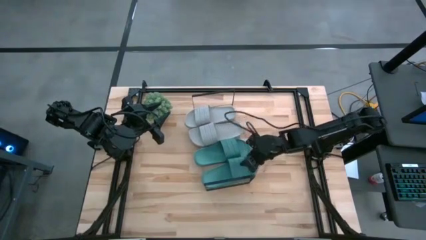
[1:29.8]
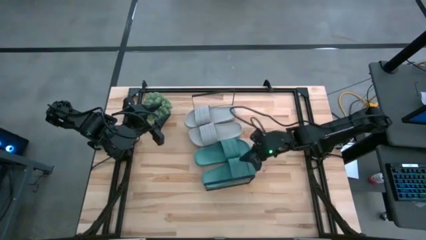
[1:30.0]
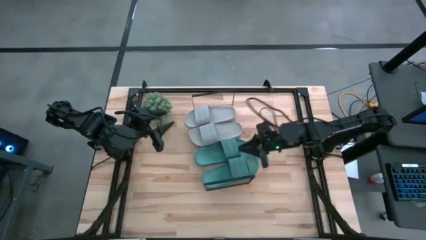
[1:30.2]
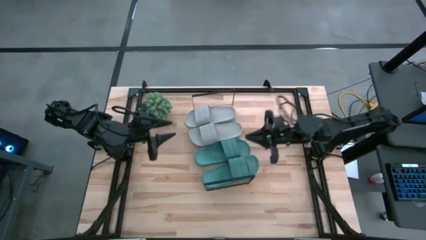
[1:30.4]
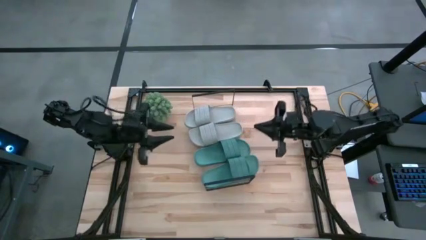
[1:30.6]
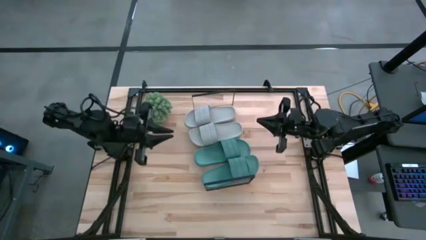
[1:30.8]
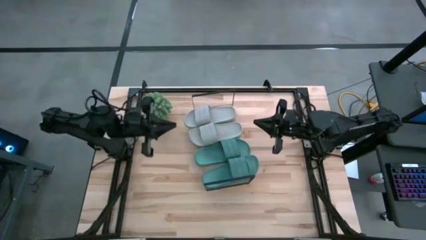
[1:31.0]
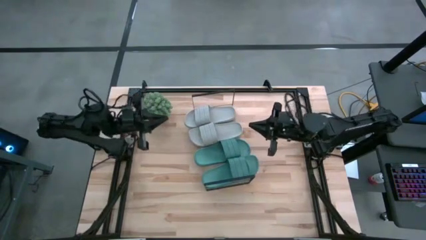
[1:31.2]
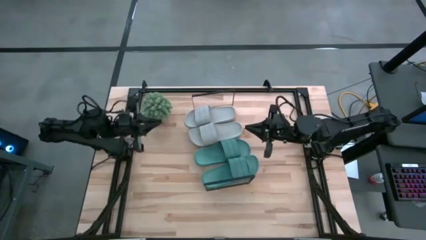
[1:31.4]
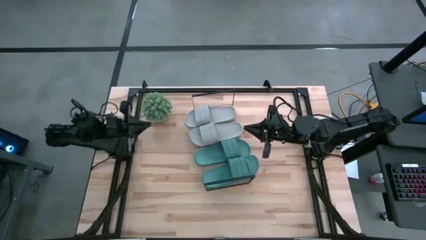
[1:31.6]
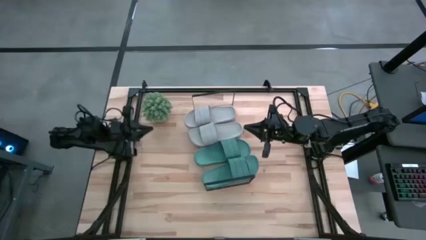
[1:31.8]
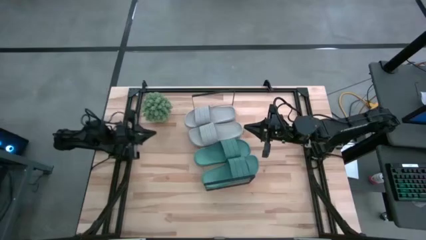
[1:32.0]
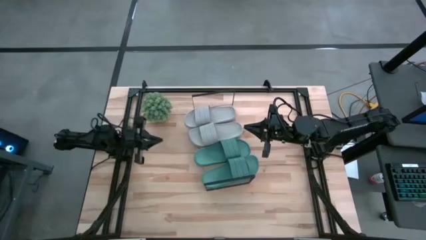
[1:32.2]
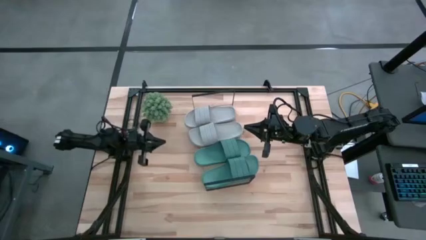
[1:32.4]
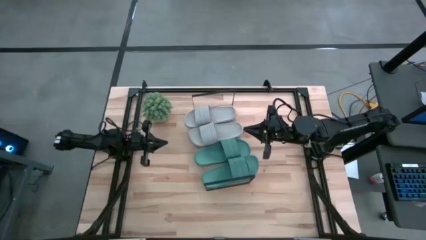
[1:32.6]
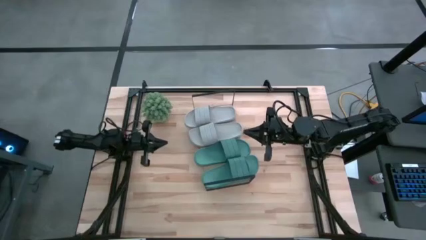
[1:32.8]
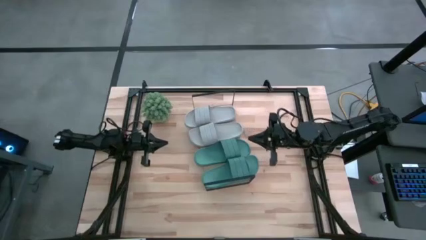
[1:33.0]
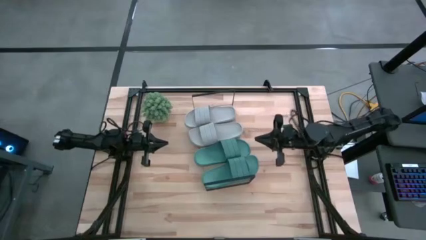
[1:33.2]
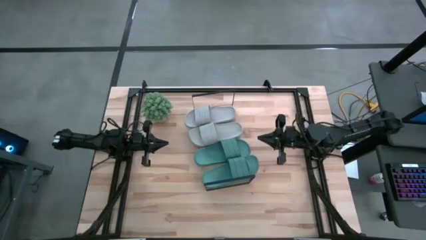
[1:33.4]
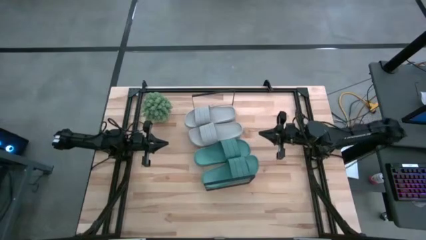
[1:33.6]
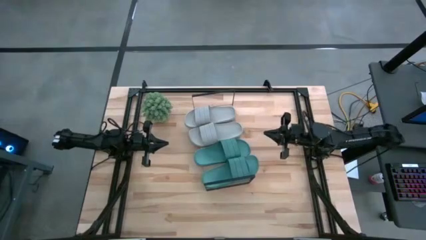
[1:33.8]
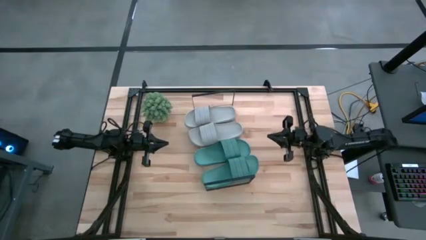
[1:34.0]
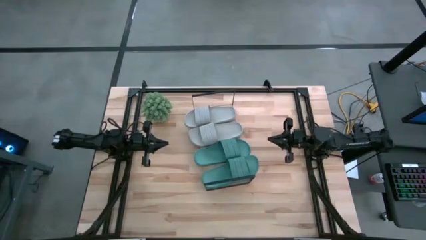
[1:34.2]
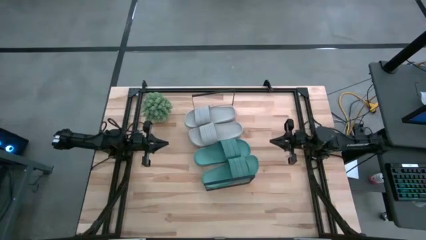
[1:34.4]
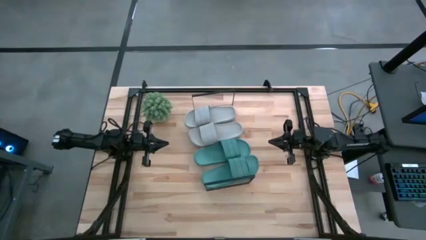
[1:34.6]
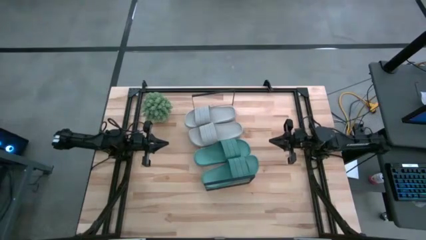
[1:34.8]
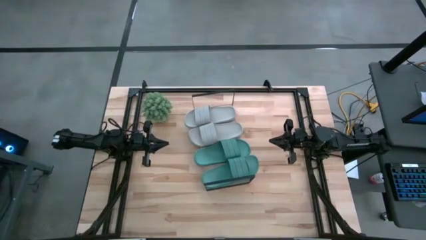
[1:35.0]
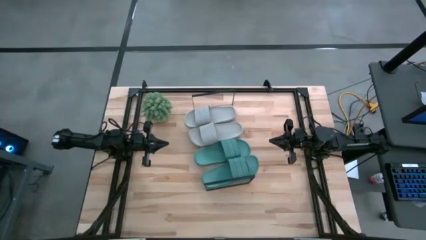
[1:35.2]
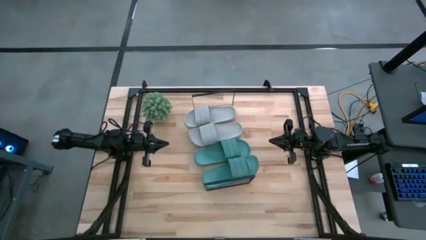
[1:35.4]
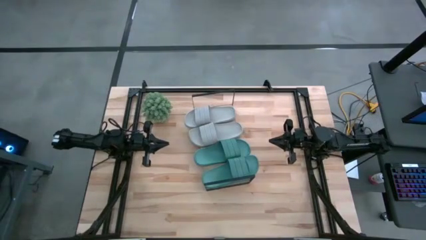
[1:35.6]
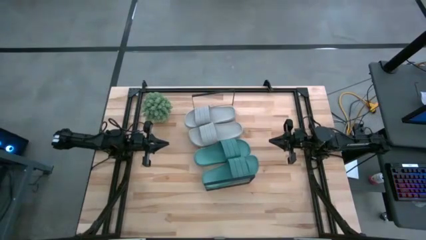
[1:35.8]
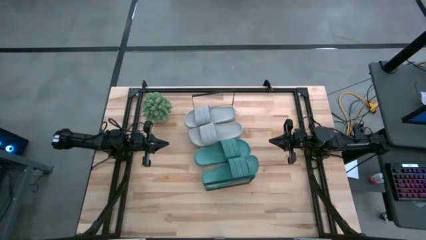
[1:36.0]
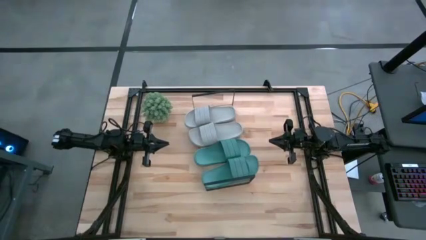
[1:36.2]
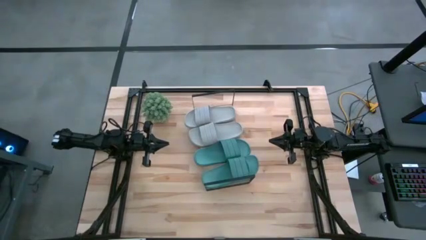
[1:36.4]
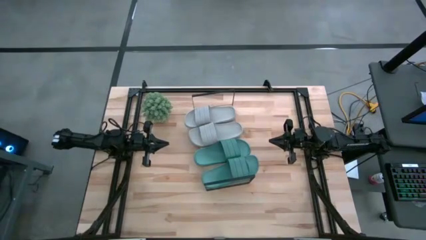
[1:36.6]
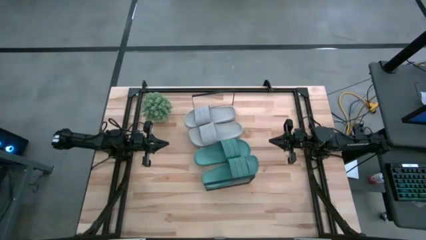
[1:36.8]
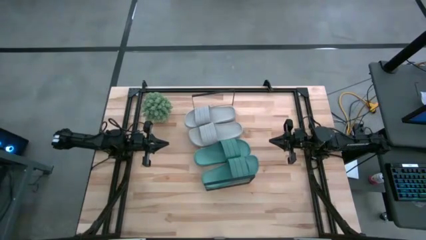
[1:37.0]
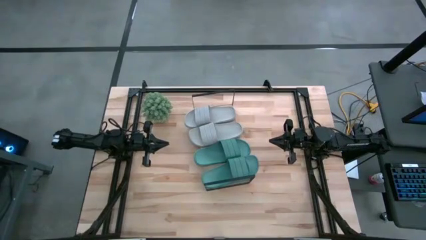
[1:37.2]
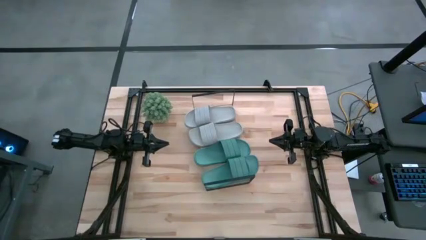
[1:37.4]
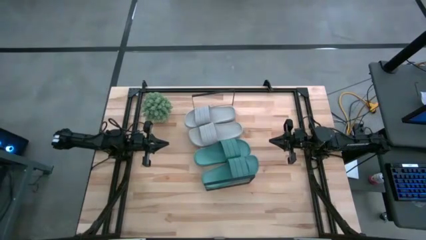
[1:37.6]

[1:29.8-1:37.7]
Task: Pick and place slides into the shelf
Return to Home Position

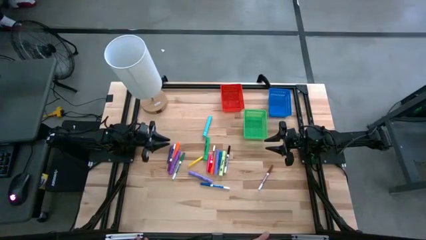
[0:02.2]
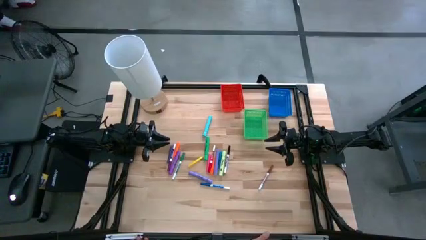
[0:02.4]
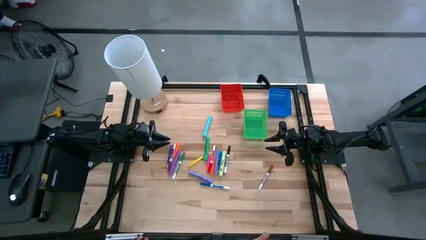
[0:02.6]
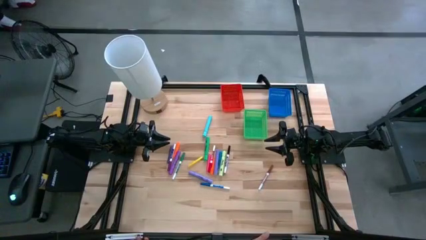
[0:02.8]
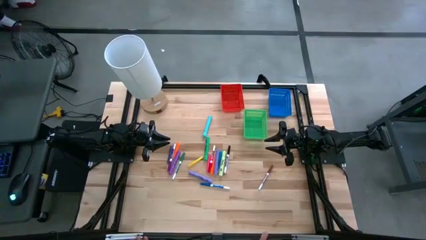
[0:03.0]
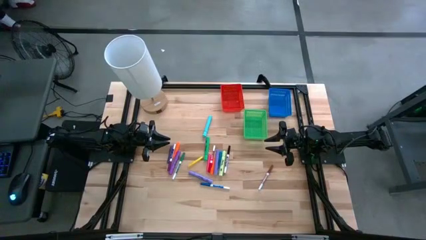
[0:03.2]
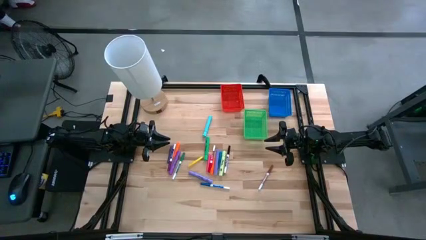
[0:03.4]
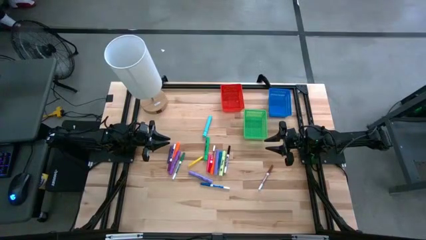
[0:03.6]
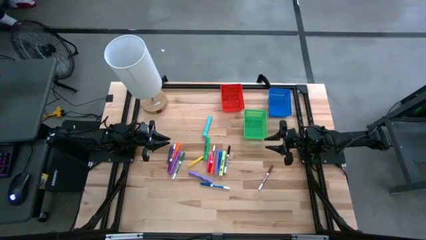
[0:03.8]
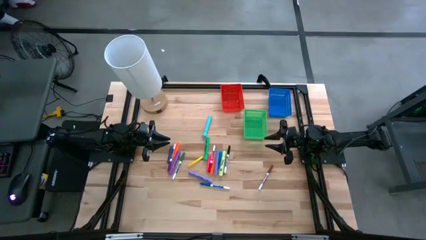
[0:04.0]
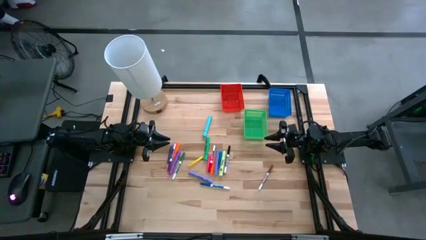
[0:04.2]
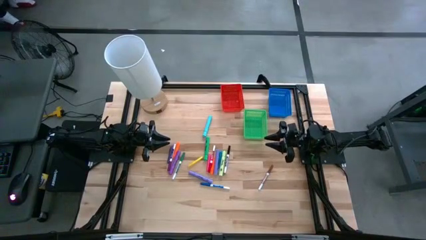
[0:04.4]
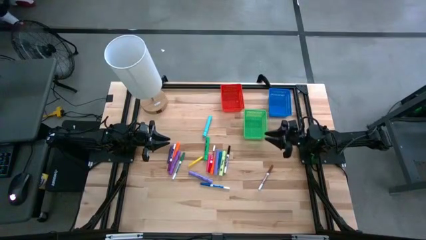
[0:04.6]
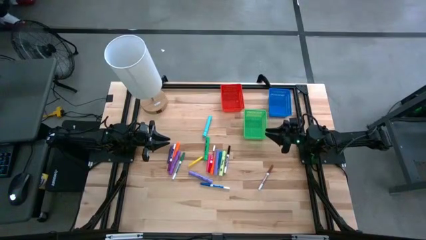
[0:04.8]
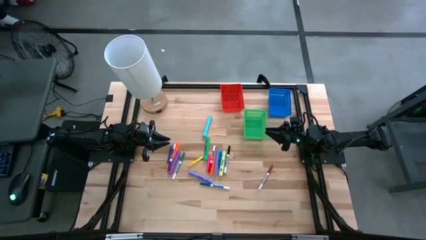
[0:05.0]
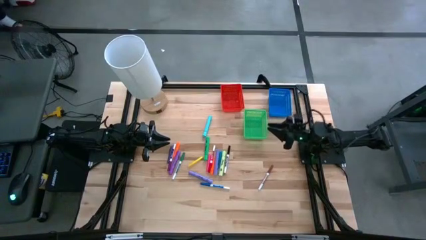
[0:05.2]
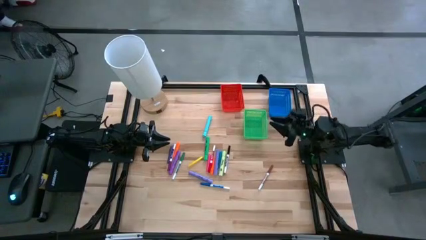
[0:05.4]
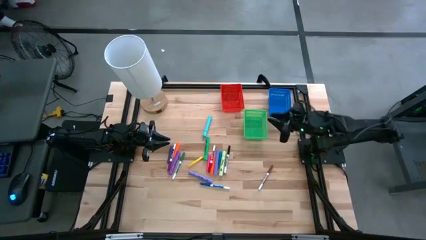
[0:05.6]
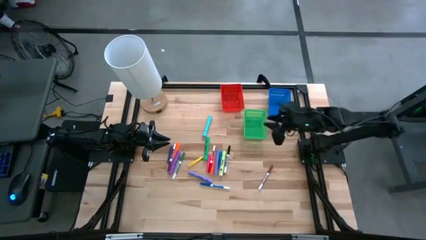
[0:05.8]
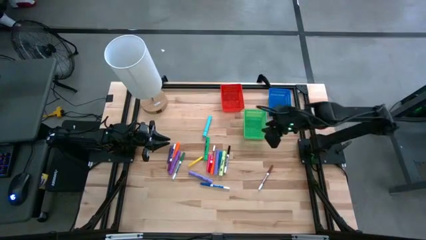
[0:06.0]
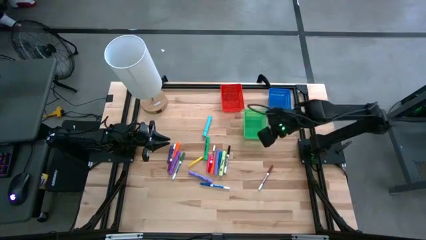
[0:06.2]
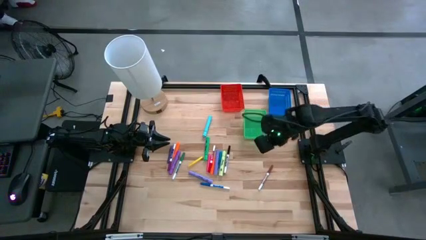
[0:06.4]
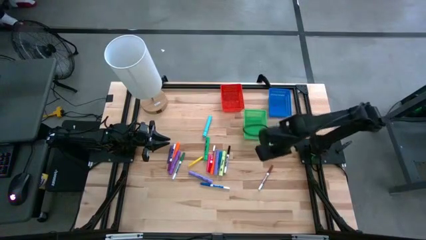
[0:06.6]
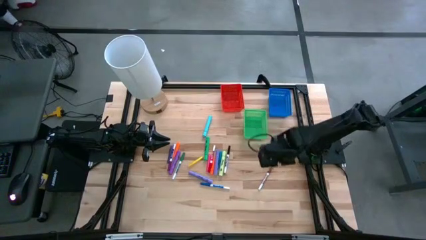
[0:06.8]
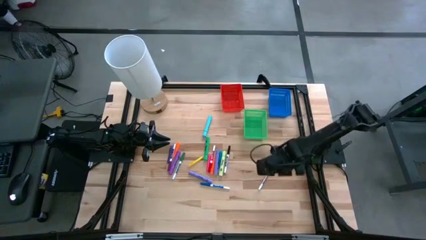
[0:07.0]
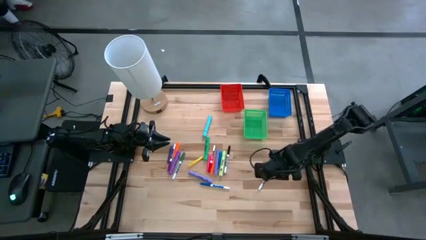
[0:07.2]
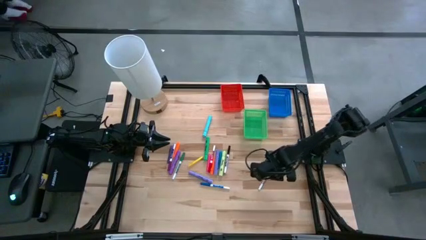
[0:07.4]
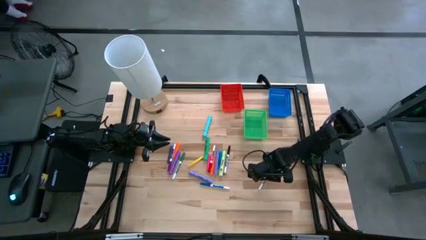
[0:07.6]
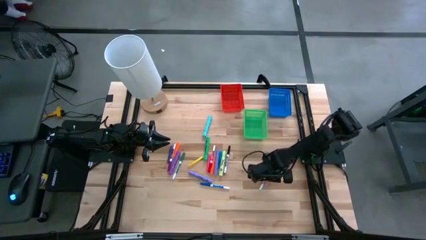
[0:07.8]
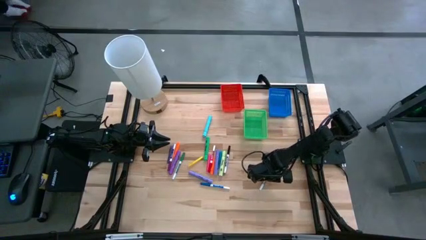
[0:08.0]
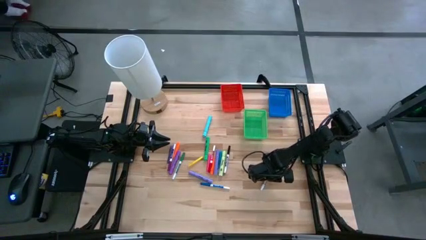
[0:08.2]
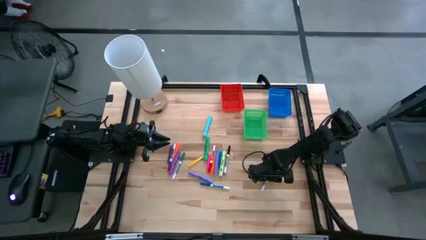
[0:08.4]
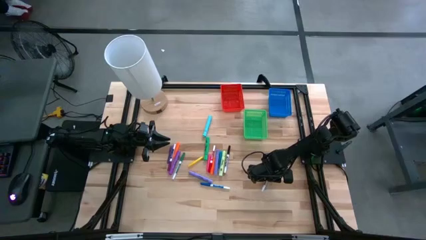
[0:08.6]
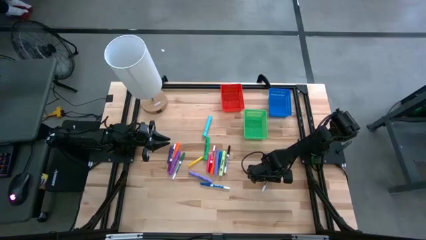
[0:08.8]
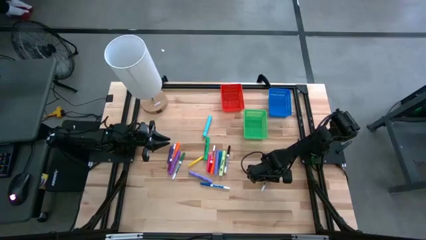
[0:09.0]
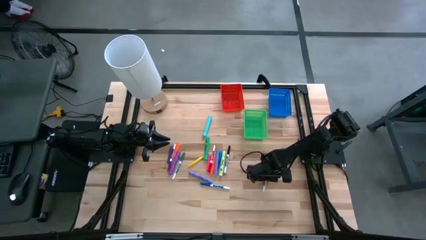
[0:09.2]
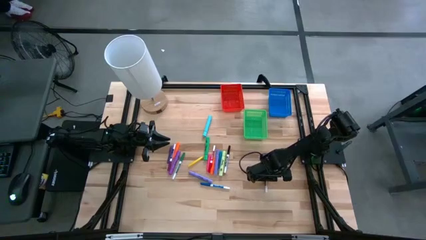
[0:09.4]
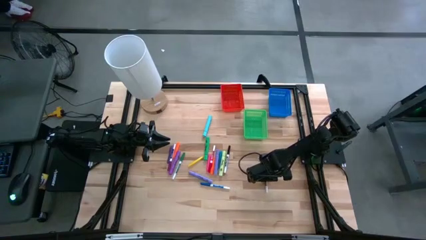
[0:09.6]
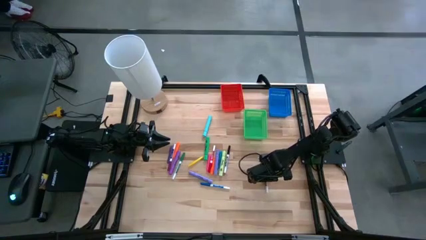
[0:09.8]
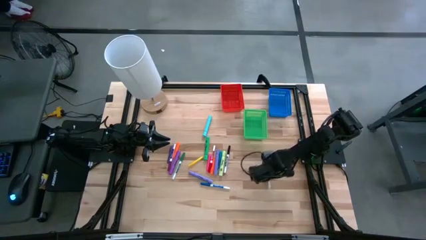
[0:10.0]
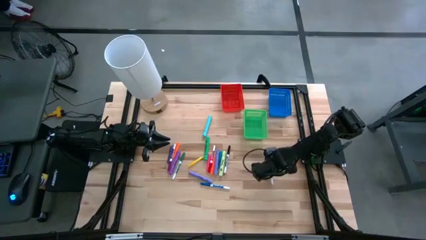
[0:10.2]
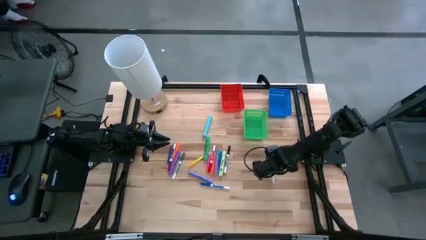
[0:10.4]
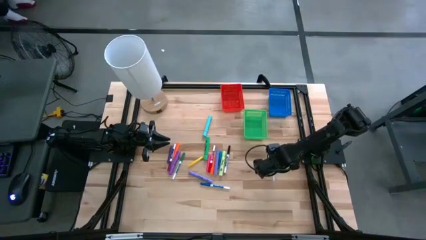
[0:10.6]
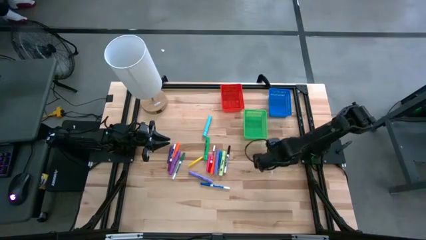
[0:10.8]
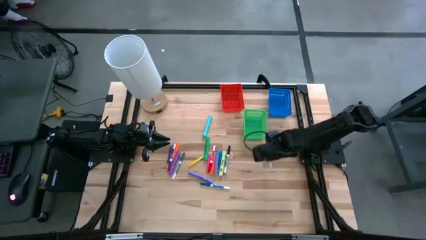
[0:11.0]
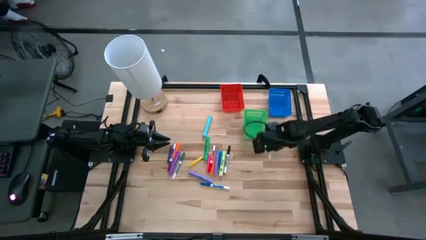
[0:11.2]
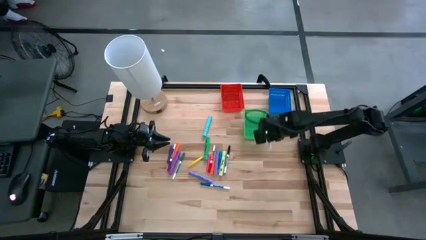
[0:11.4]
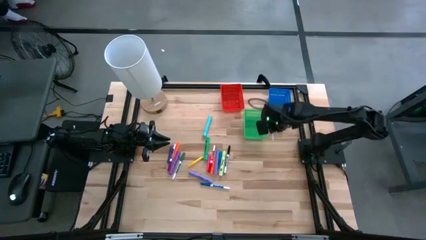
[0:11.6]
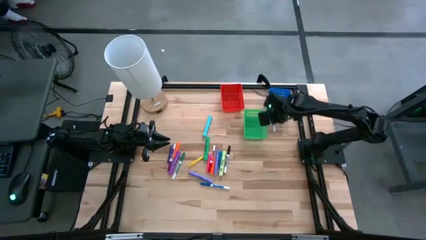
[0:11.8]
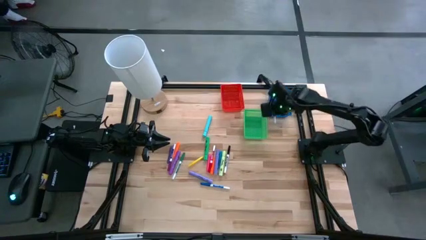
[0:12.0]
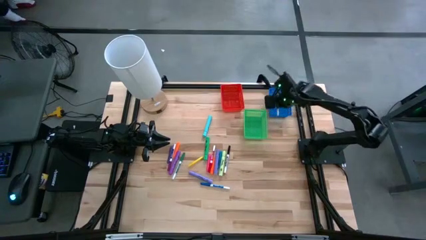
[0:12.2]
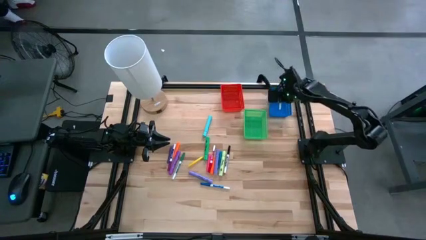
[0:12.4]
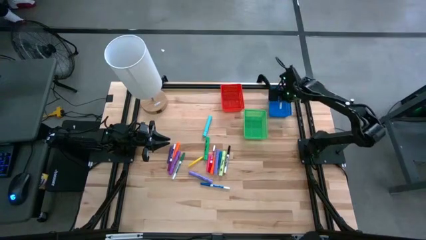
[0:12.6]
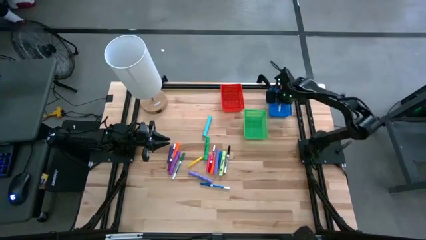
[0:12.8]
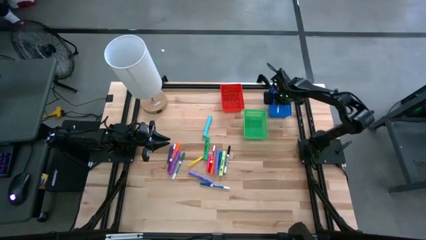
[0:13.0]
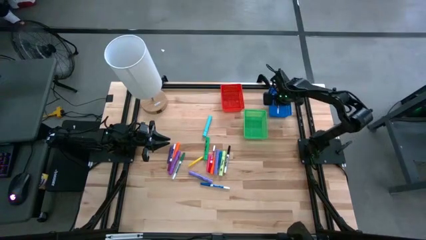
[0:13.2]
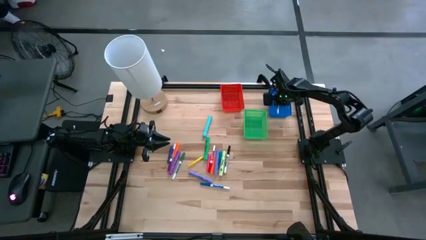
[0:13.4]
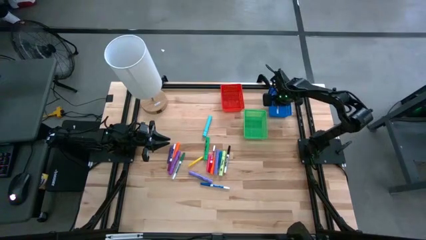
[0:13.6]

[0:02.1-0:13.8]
Task: Pick & Place Markers
Put the brown marker in the blue bin
